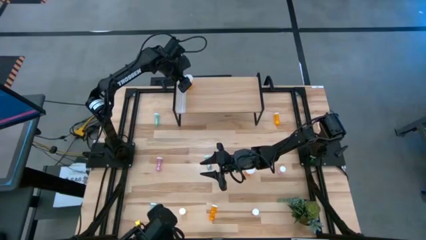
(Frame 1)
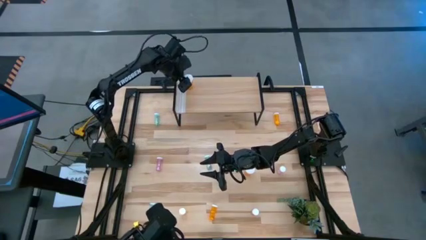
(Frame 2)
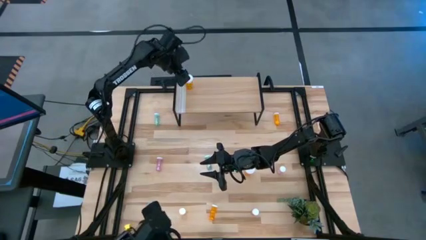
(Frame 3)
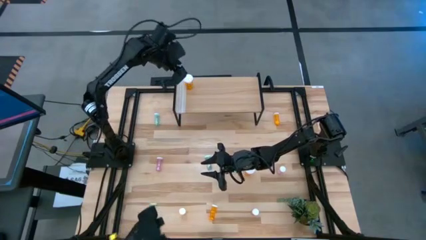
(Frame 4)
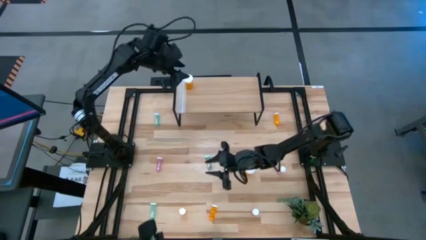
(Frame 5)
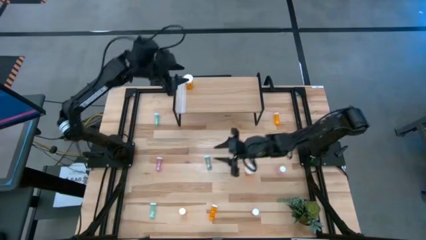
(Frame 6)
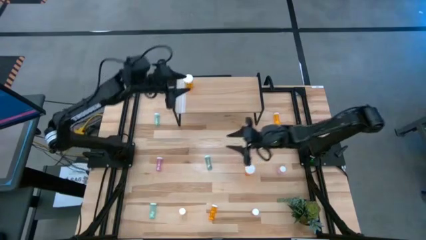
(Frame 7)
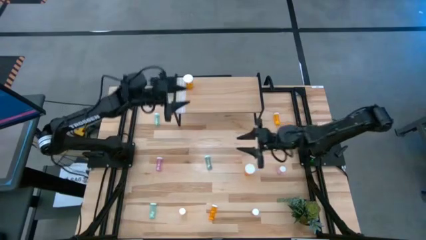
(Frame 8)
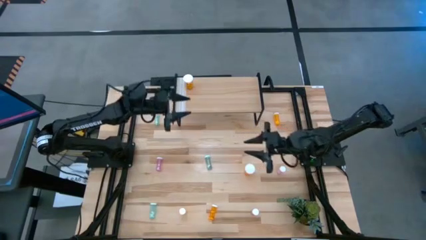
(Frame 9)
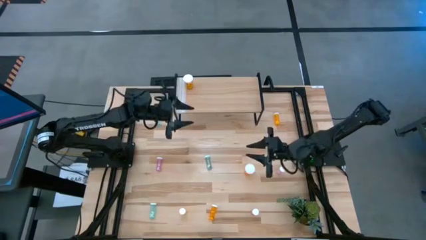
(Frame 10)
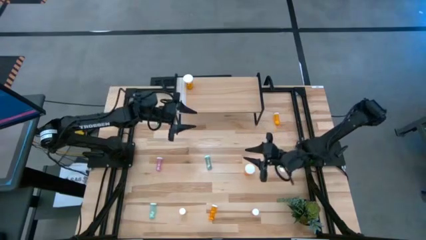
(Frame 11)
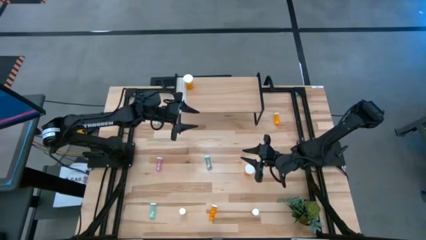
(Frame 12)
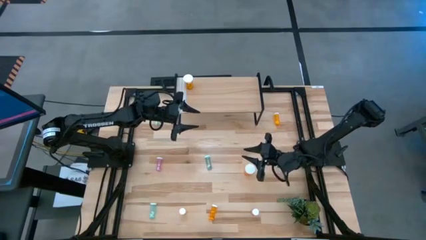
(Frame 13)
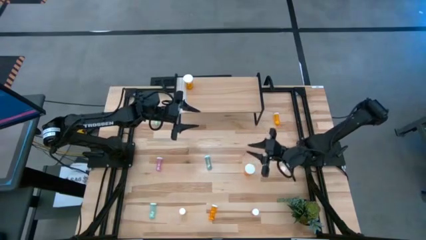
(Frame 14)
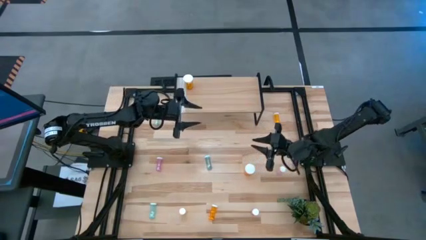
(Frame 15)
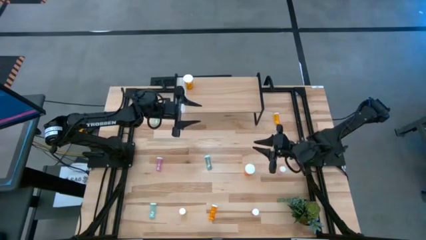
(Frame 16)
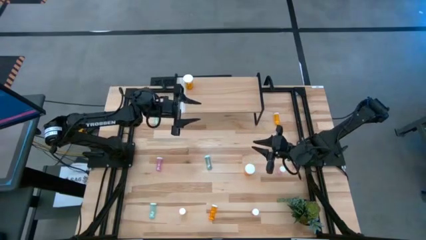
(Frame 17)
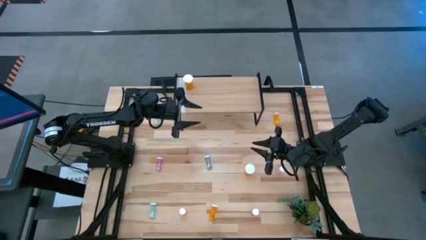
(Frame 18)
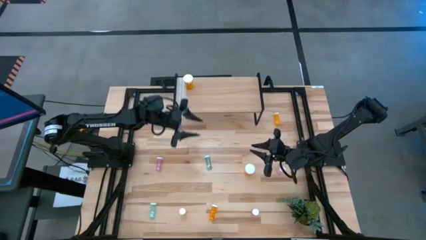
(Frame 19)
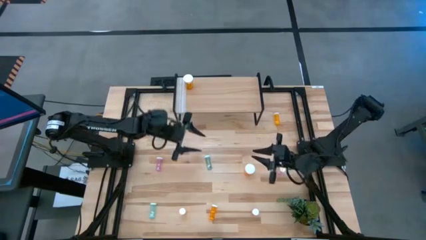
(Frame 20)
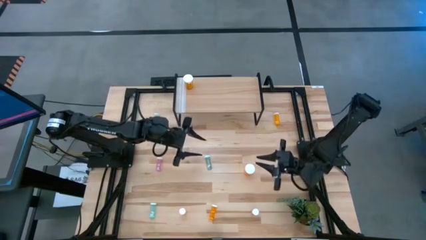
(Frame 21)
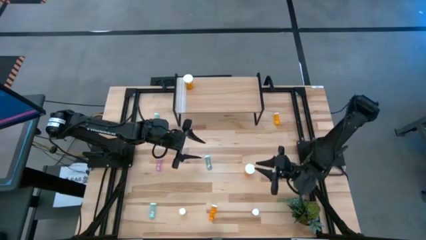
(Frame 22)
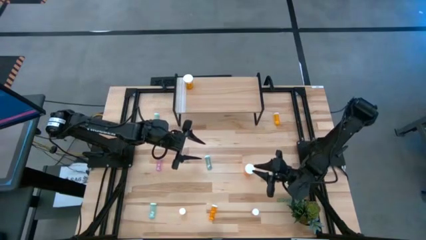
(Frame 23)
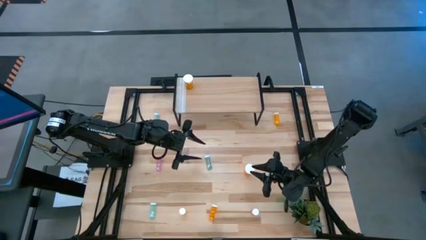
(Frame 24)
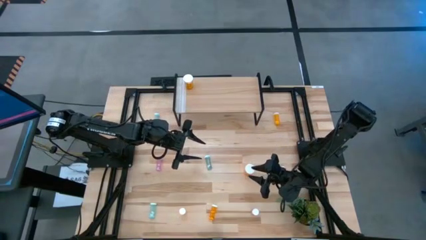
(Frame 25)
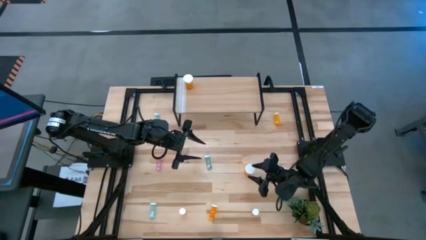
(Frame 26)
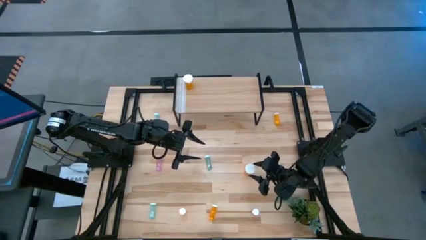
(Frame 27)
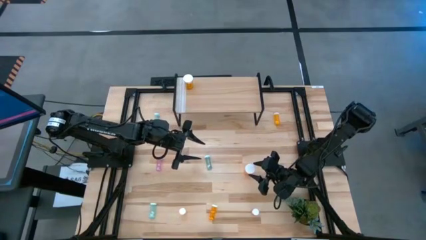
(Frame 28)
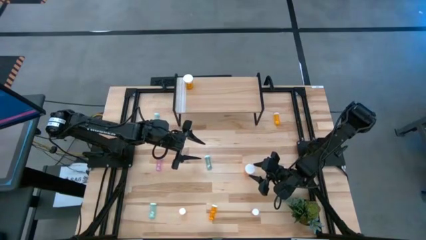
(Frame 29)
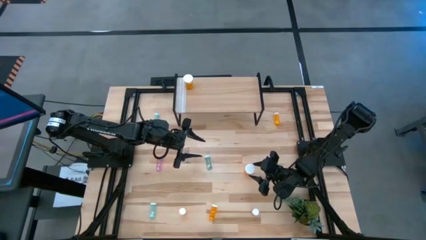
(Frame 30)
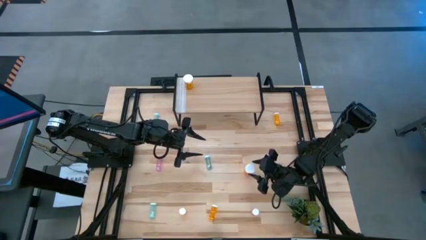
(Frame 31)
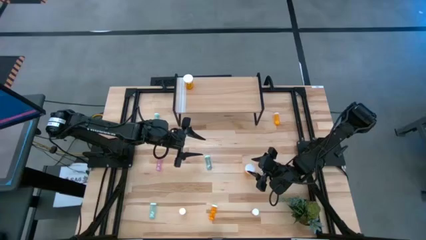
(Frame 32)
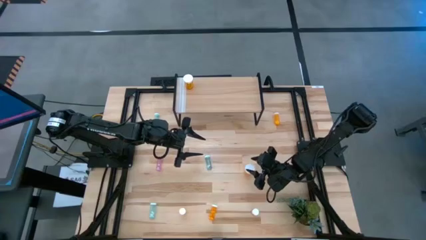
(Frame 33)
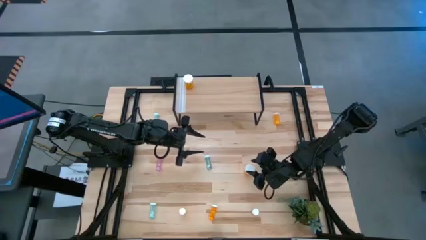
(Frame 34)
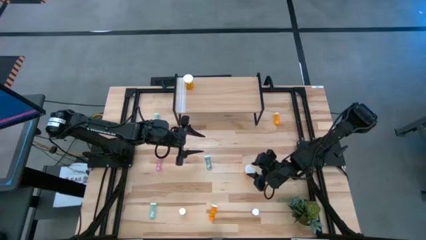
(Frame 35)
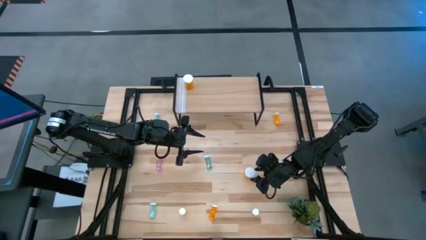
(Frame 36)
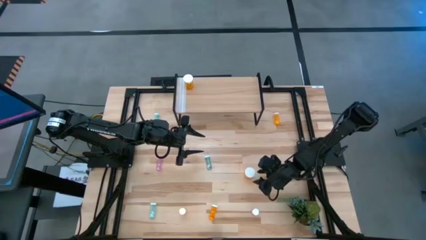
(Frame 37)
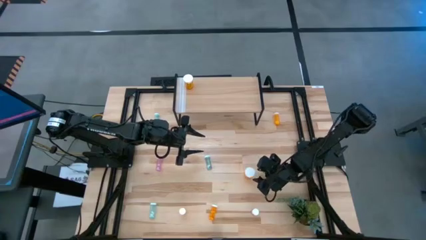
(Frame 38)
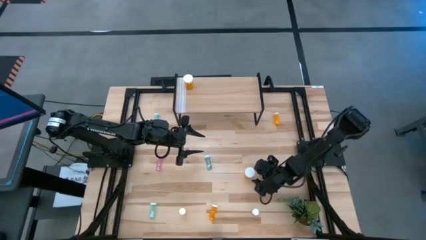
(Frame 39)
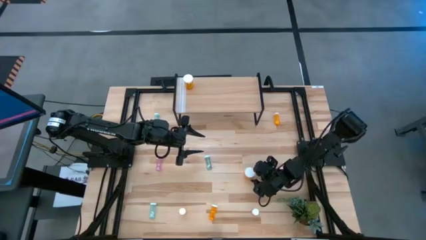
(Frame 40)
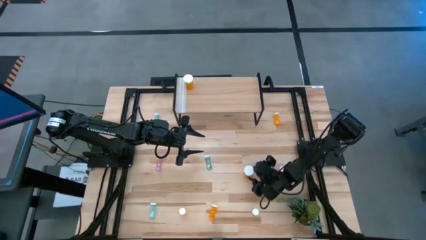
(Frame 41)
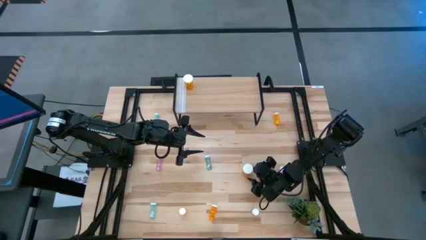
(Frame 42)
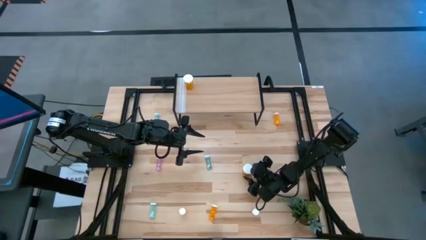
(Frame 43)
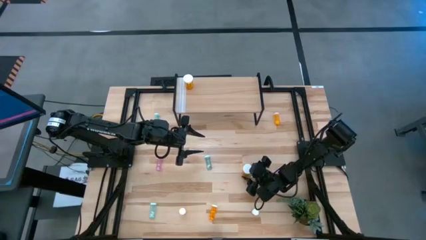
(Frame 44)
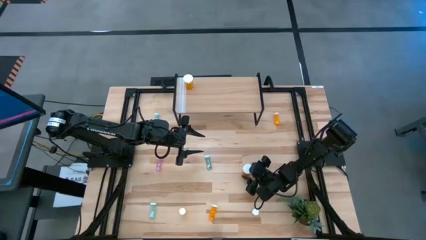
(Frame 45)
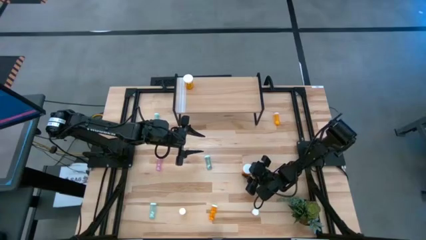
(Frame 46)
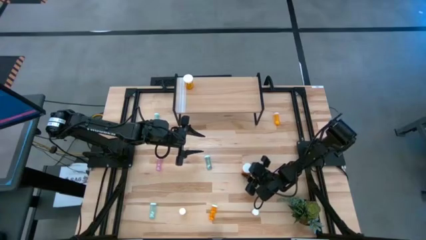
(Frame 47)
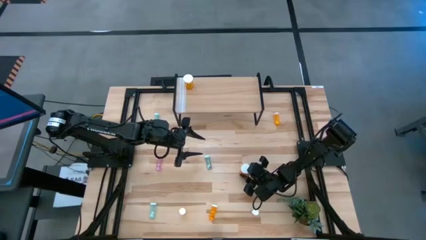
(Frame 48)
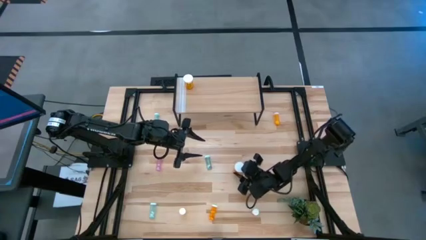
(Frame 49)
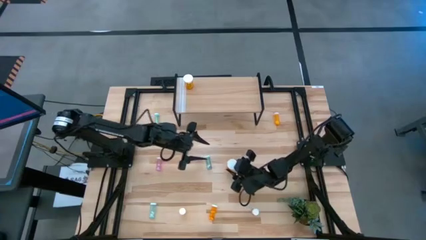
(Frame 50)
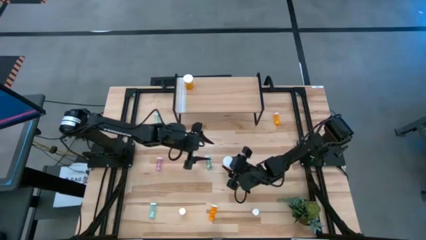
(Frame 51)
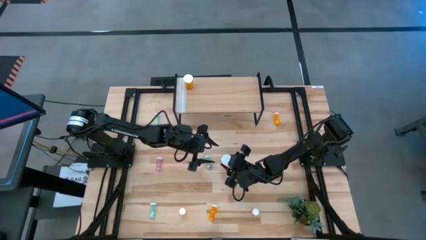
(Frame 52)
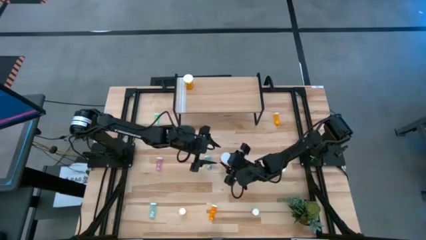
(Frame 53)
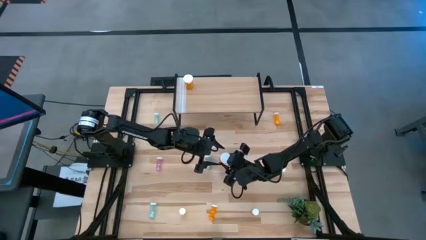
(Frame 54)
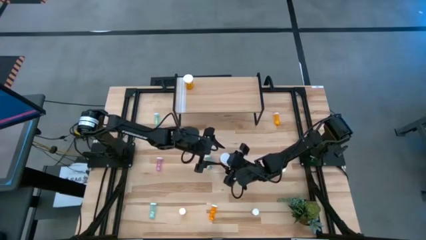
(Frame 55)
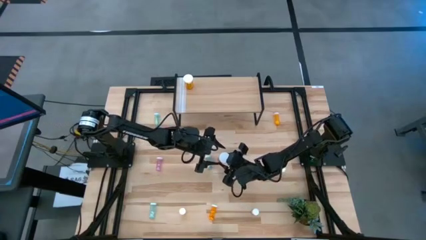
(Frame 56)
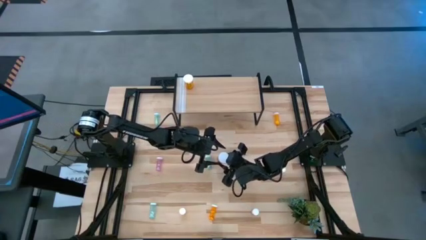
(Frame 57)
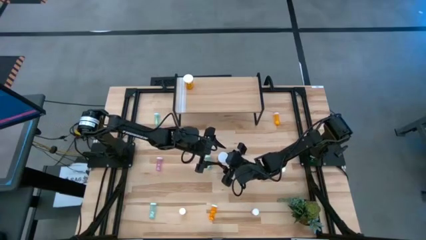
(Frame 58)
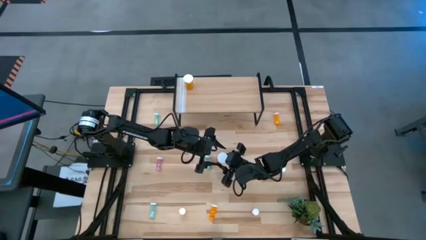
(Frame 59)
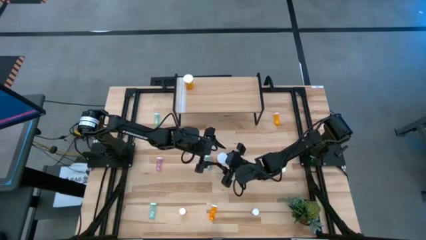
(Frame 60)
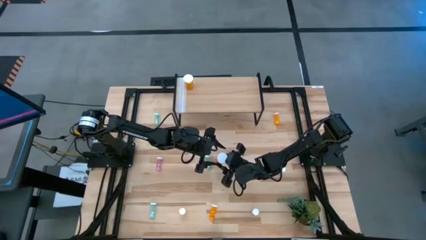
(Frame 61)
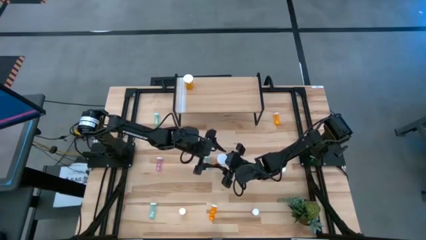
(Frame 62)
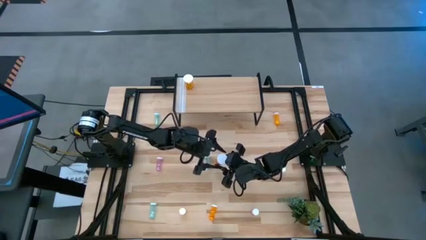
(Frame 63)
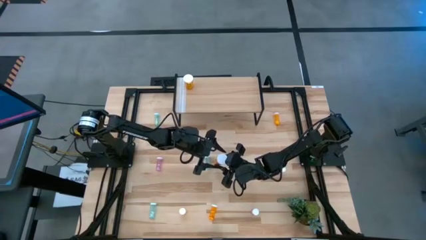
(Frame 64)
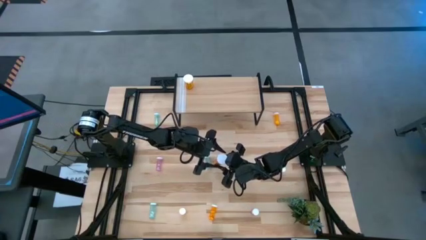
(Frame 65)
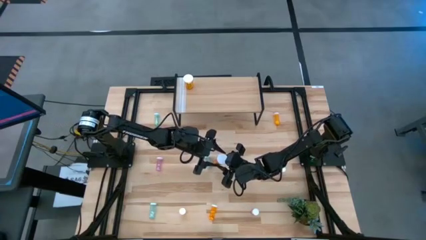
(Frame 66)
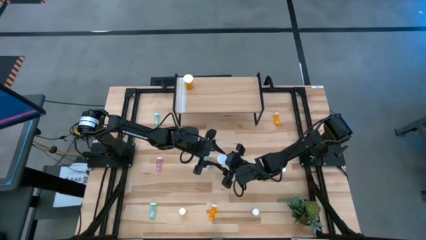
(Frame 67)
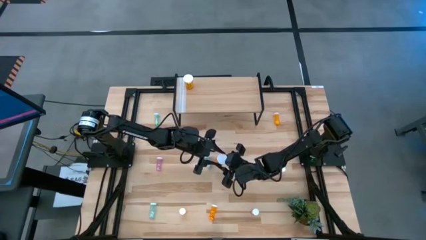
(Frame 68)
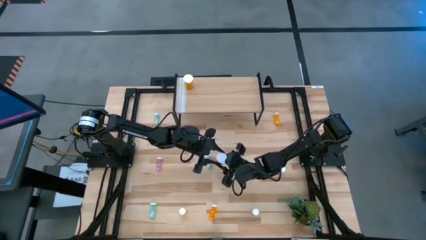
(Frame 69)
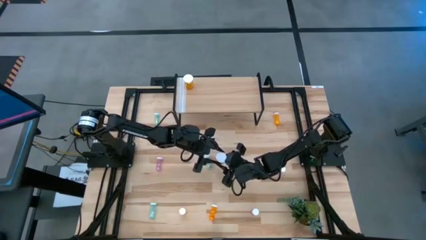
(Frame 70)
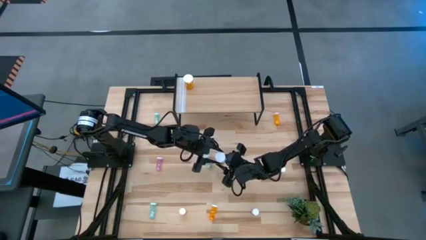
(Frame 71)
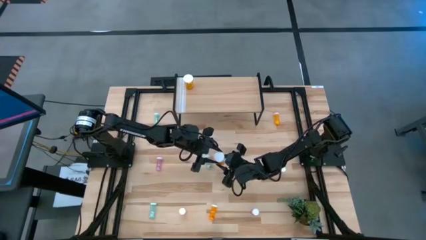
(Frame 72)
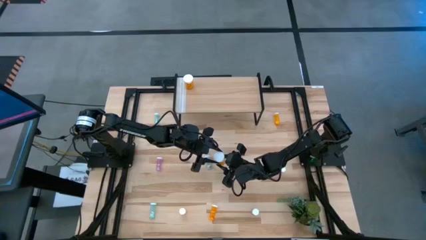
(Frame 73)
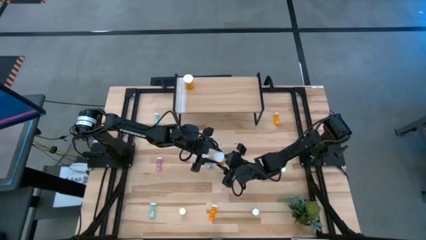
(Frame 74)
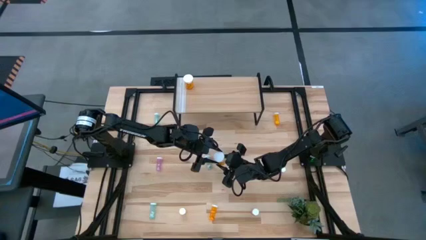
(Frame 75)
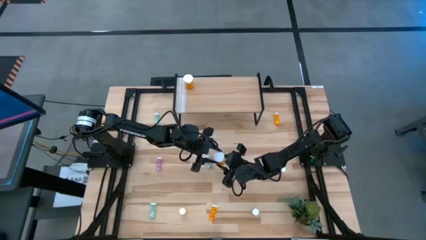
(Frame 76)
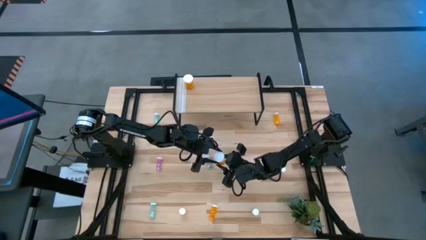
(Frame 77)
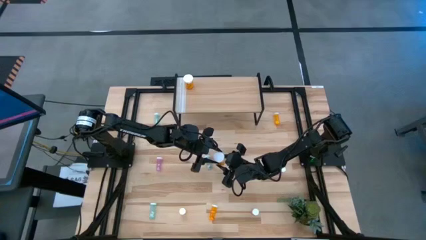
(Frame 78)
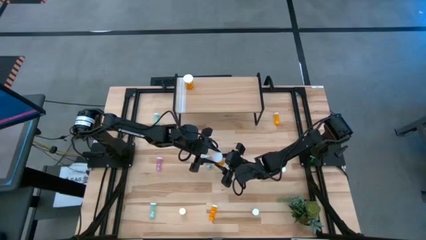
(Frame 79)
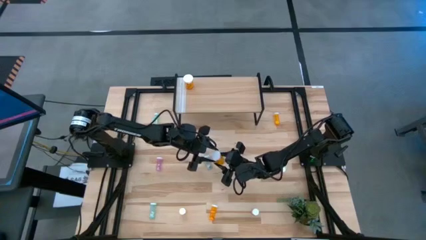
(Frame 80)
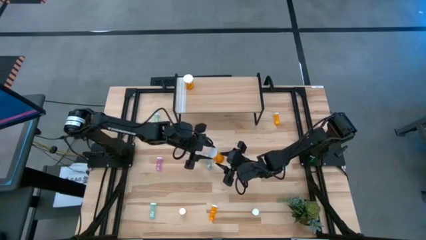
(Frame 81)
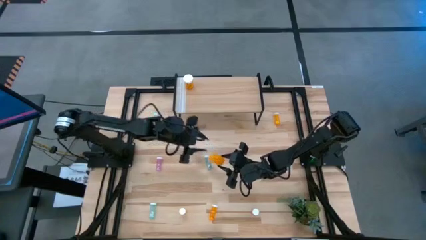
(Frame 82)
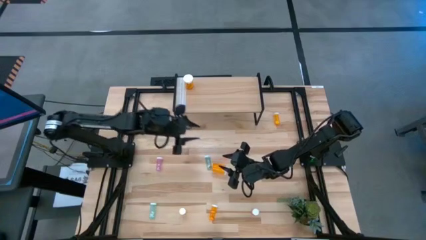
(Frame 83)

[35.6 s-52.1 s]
Task: Pick and place medicine bottles onto shelf by color
Put the large orange pill bottle aligned with the other large orange pill bottle on the shelf
